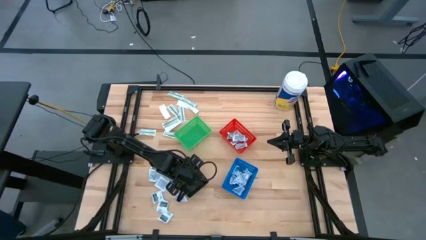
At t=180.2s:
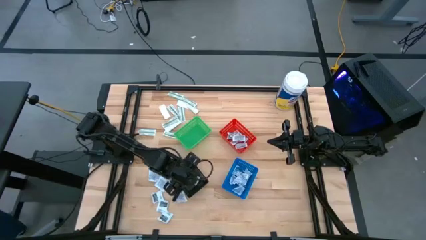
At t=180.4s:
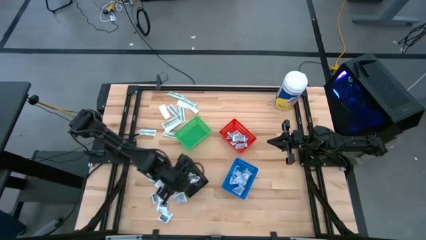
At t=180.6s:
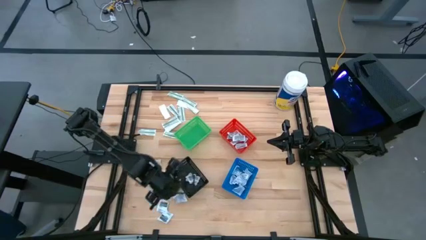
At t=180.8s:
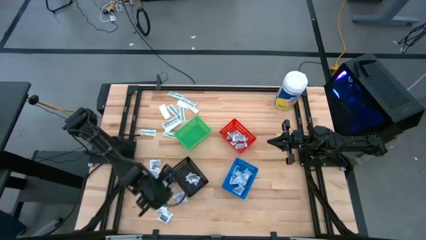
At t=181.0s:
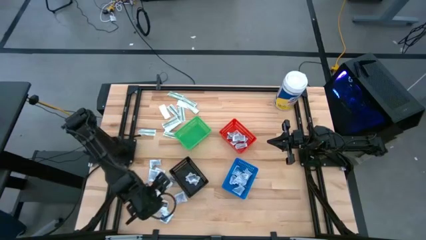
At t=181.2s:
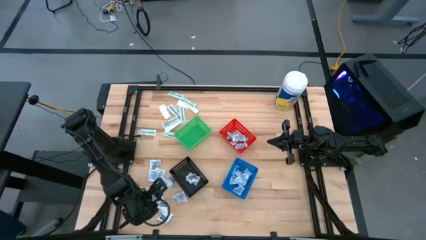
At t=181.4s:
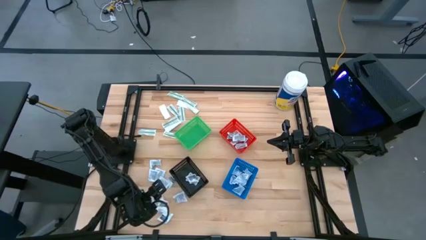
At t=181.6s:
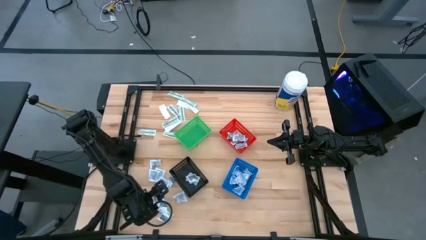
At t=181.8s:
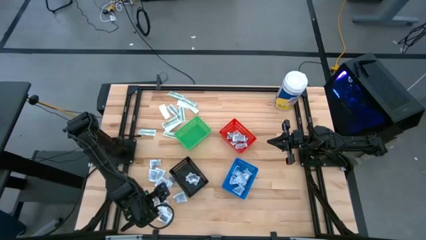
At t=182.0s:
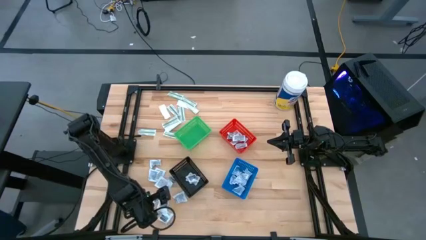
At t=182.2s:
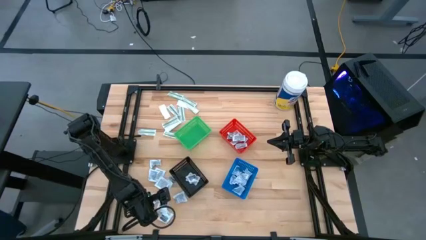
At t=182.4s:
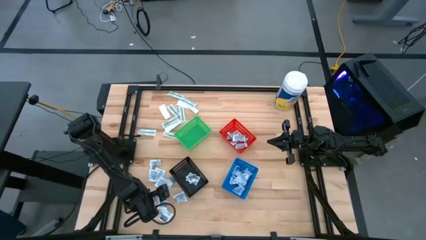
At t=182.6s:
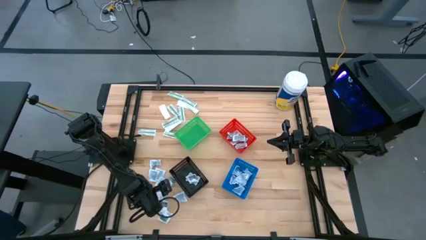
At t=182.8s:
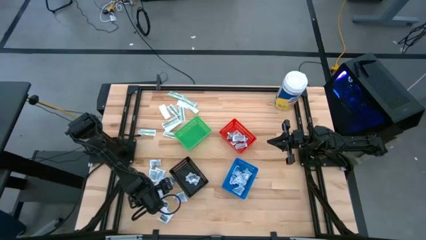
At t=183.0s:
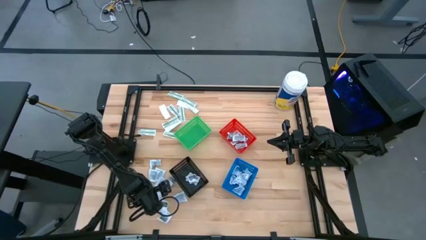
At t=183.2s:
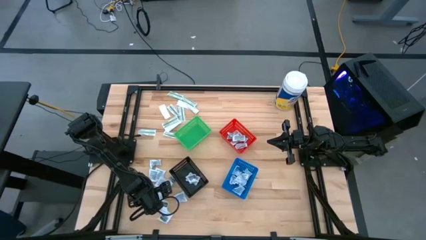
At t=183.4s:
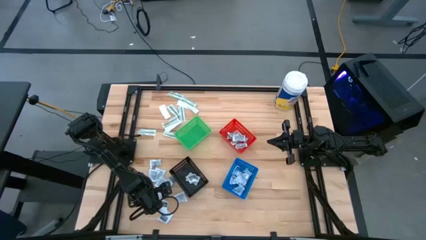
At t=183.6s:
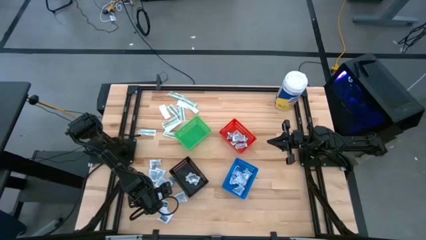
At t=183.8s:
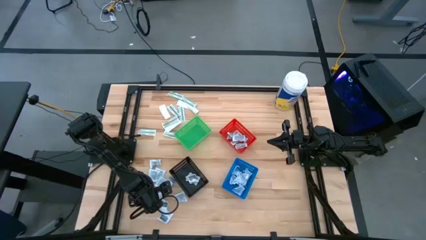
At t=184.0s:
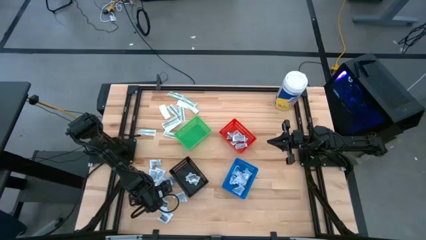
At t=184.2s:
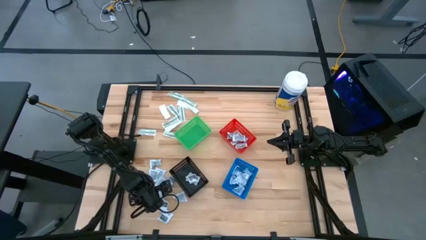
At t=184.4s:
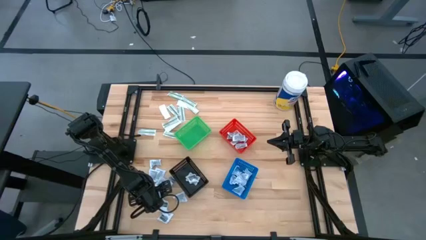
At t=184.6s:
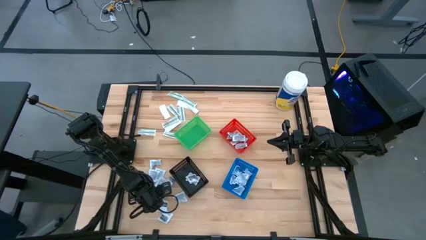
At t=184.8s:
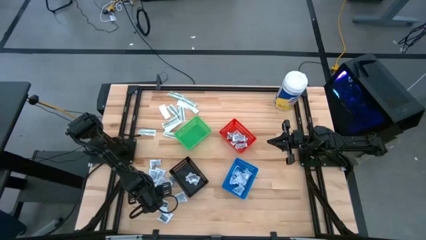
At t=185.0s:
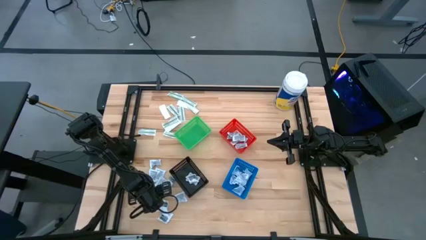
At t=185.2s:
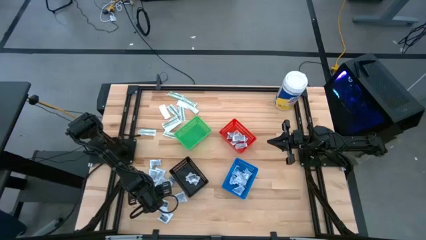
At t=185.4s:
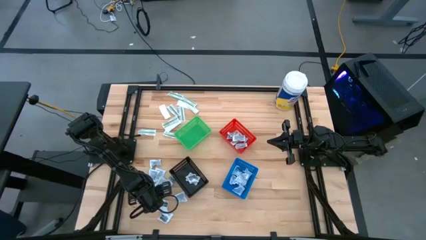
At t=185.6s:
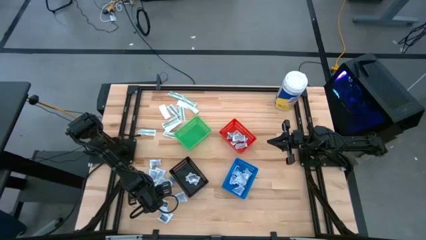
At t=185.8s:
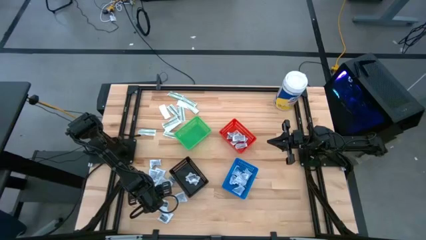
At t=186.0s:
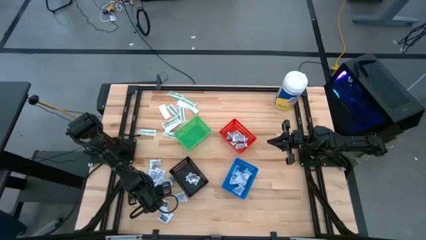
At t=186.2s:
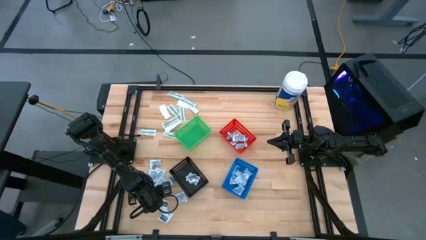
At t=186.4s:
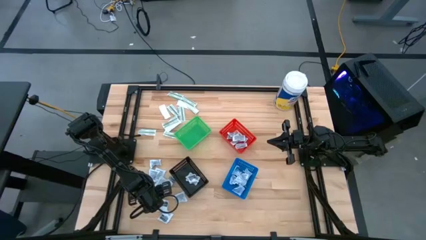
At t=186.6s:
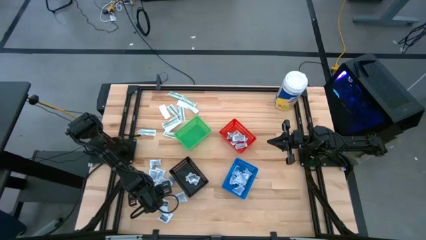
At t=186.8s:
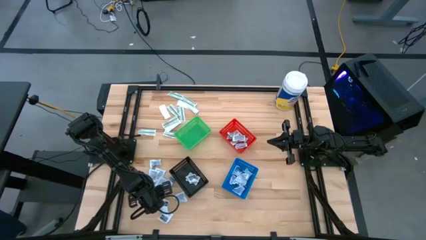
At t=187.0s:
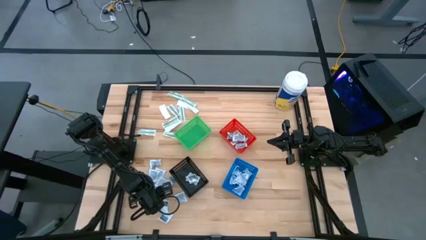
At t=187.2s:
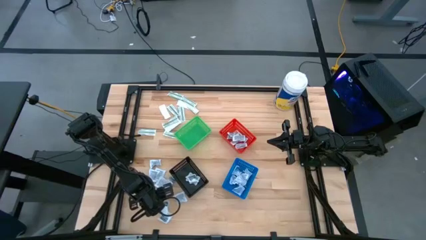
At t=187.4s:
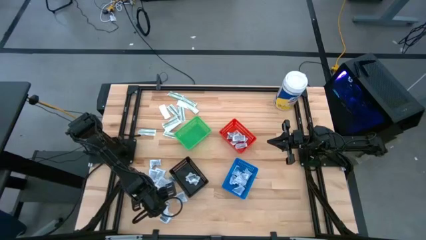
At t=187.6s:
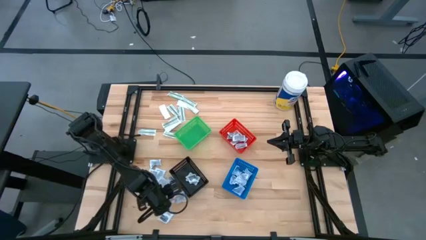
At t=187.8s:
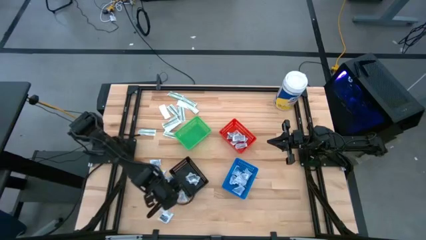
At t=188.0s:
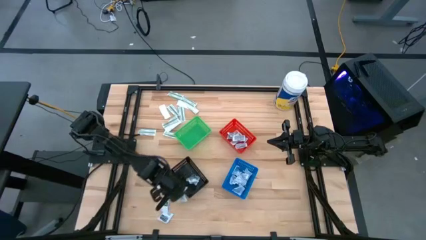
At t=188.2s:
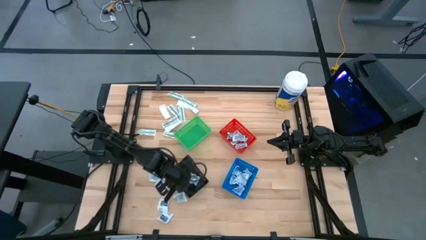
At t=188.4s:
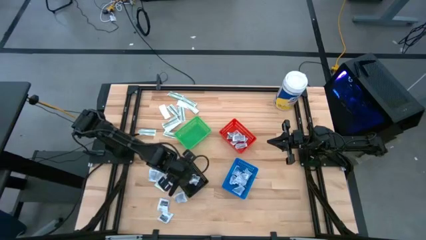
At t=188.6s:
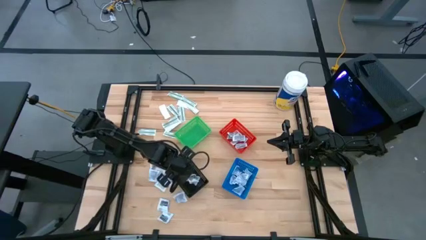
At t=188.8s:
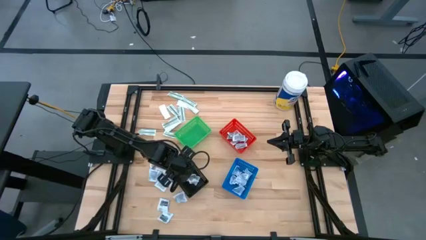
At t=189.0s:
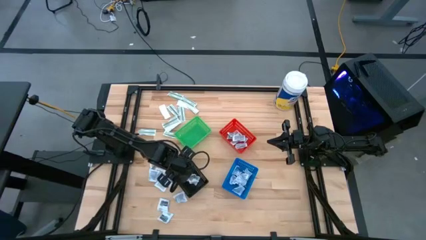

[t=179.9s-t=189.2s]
Task: Pick & Place First Aid Supplies
Put the black towelette pack into the black bin

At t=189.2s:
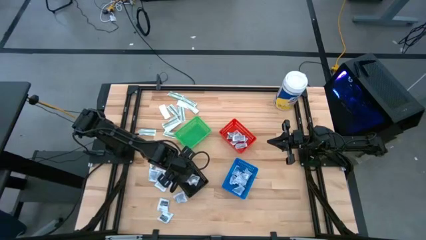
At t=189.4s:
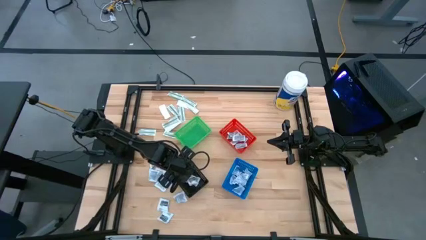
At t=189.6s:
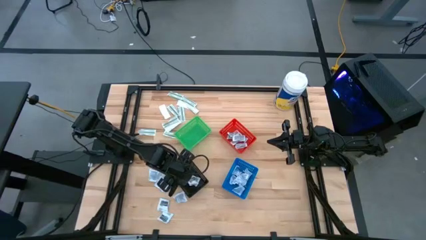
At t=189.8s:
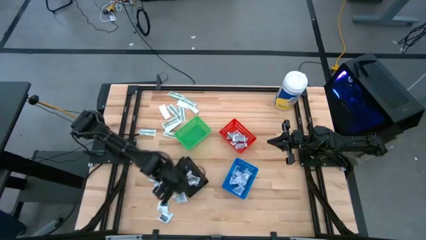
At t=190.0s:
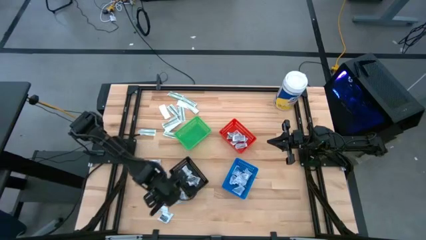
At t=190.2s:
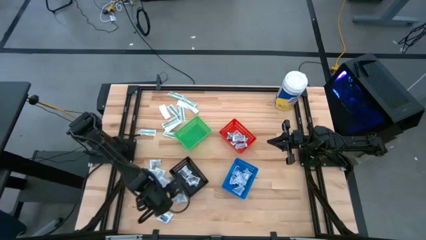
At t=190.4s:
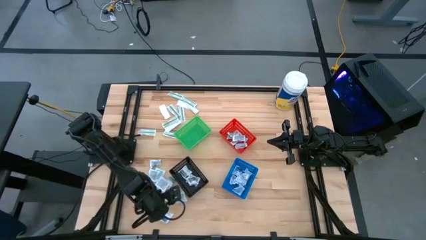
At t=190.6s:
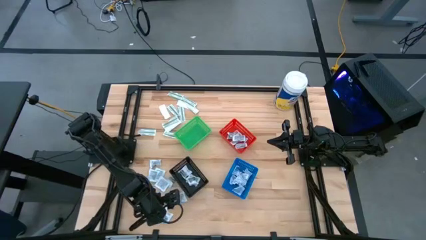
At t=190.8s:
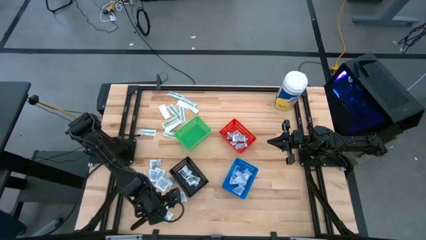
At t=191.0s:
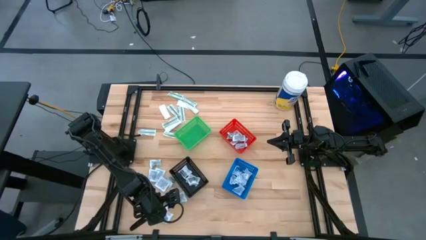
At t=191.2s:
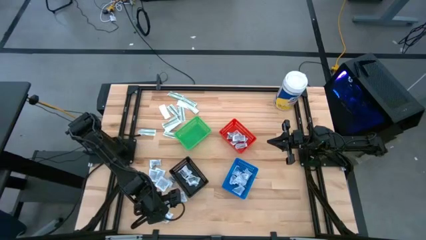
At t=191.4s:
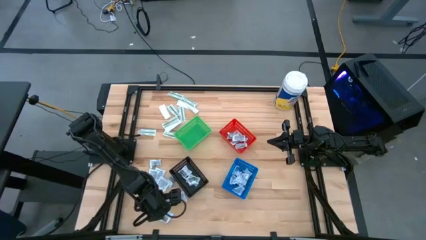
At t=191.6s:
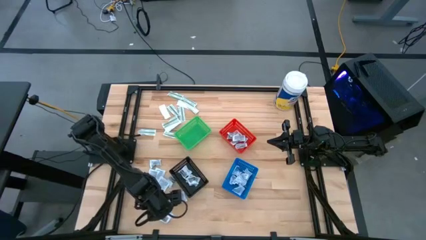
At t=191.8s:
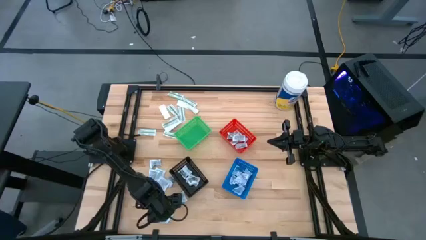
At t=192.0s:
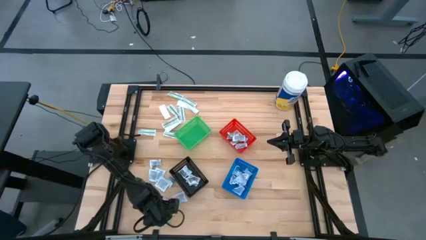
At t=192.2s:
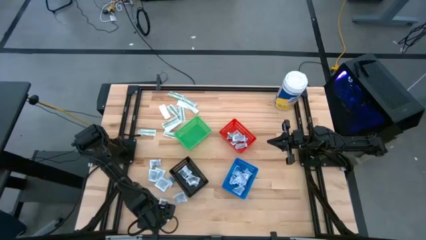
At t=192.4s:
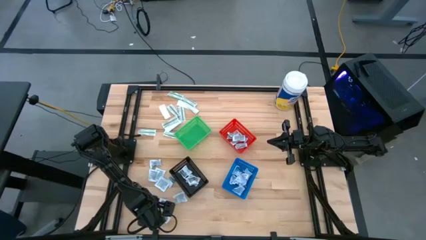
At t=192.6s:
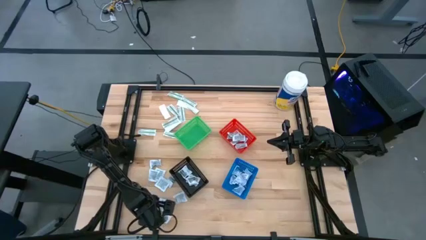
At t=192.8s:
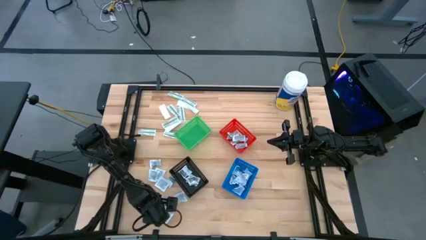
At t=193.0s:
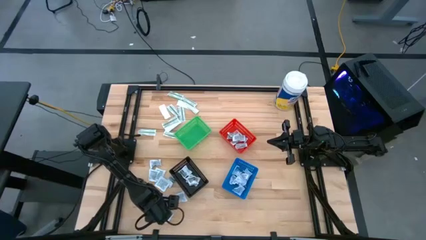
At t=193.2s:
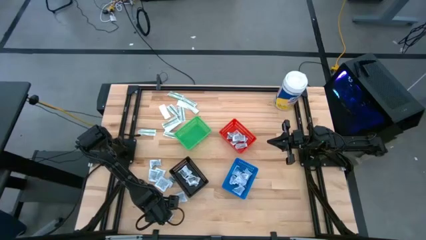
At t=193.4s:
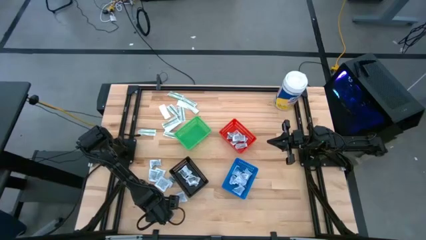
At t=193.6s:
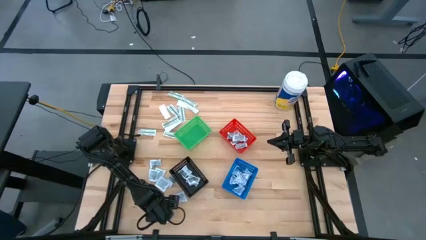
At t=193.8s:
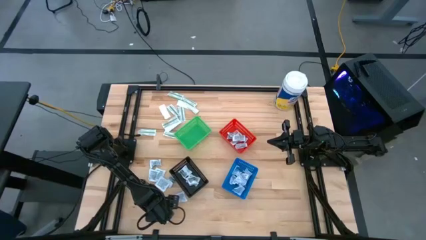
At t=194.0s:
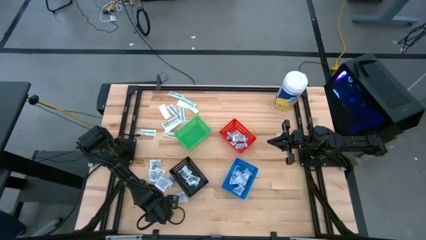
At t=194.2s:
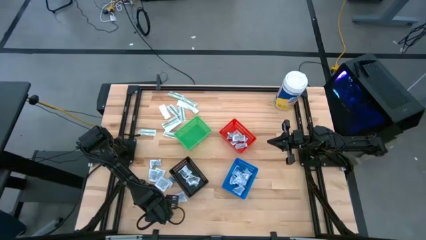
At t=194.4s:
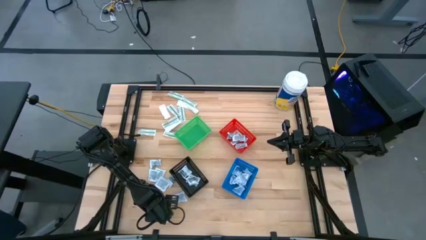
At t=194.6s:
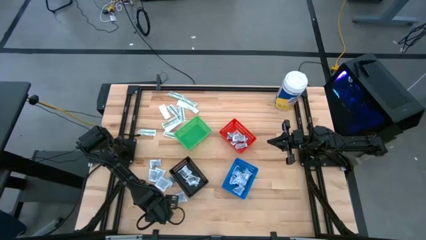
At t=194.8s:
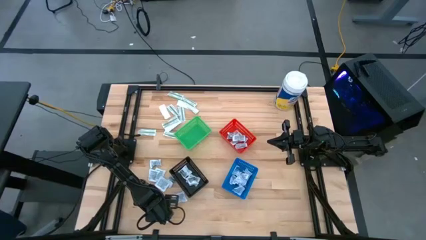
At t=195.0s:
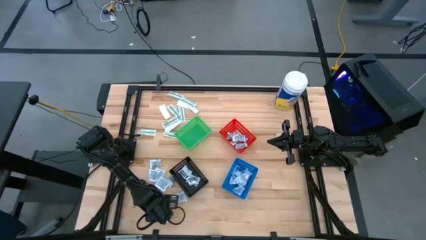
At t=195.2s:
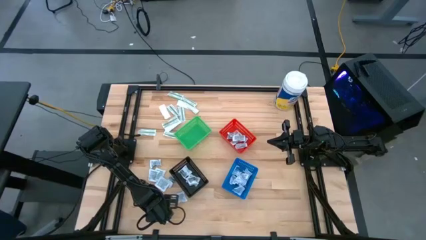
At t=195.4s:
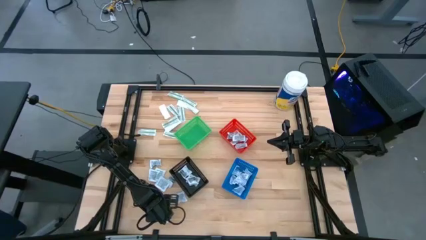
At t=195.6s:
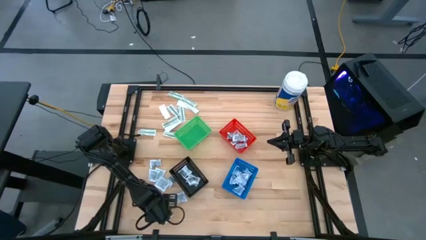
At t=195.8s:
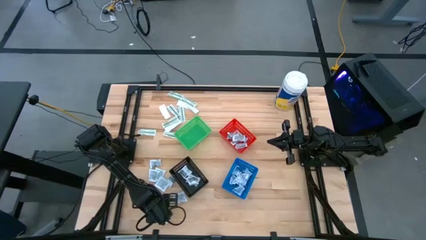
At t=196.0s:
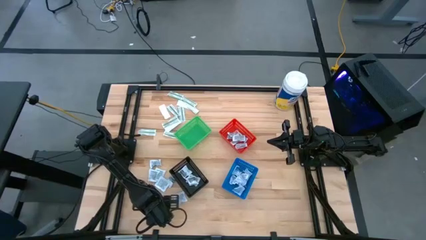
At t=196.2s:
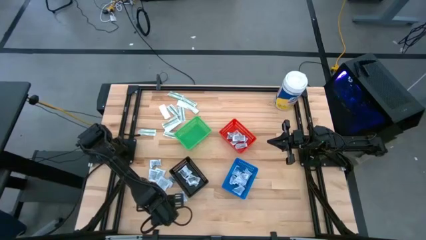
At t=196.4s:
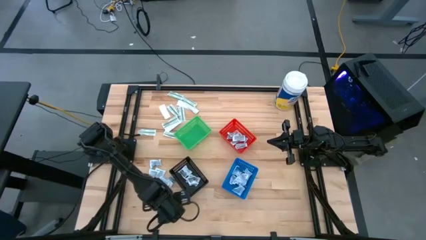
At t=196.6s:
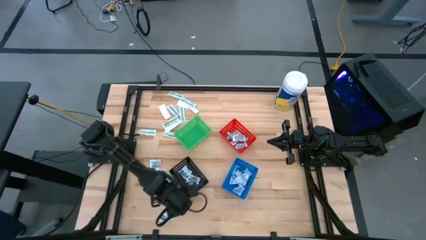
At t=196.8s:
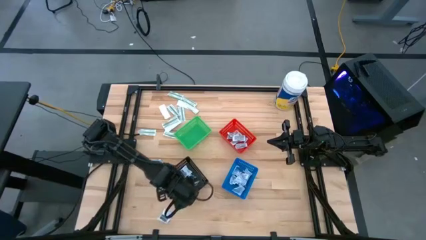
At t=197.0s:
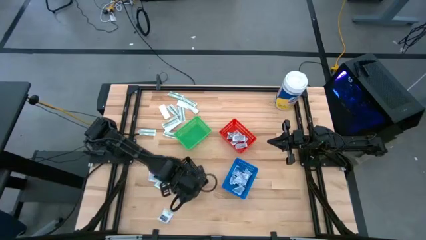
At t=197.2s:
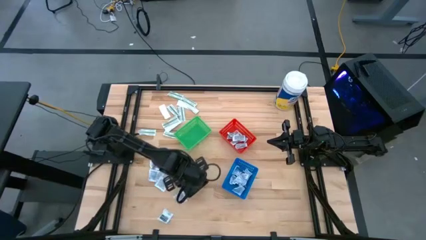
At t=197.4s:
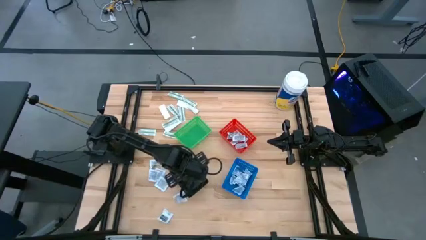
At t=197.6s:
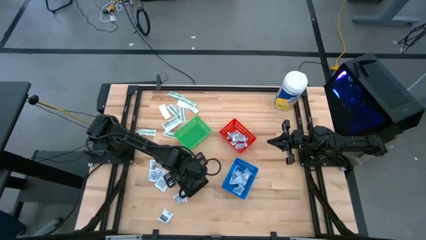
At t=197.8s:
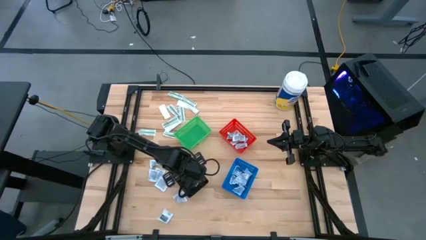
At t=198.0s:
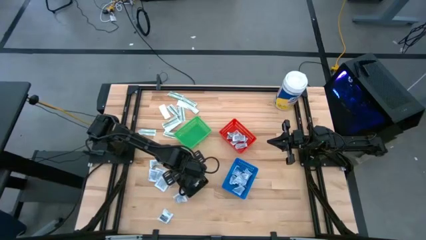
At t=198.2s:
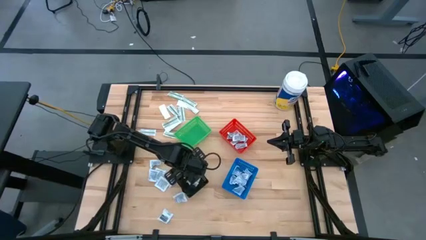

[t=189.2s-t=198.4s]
Put the black towelette pack into the black bin
